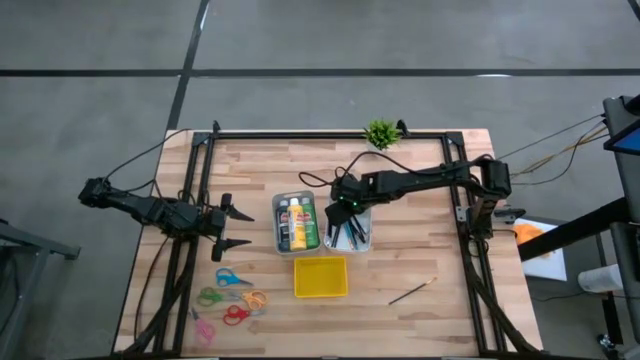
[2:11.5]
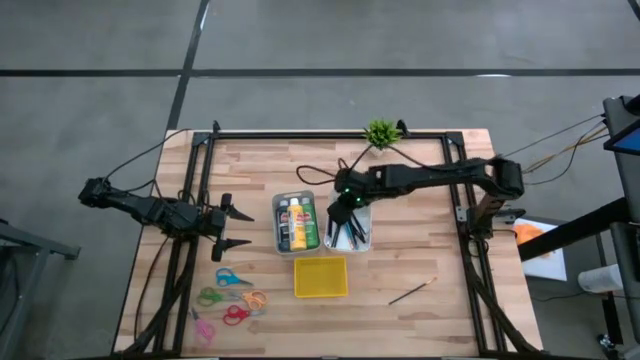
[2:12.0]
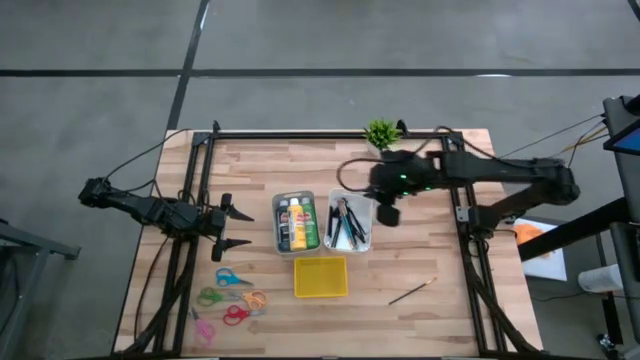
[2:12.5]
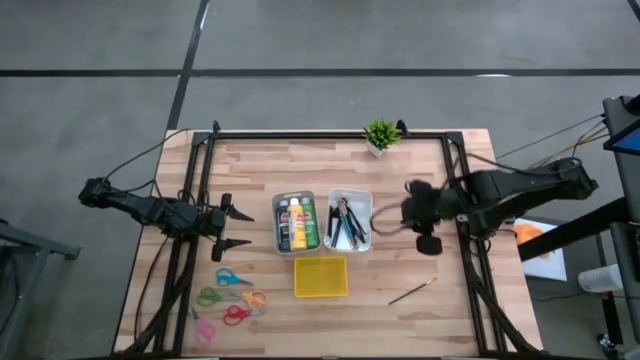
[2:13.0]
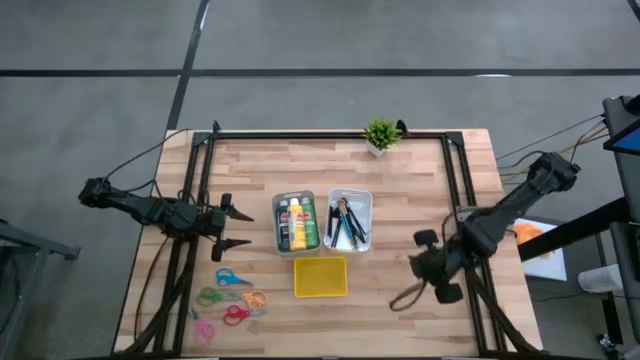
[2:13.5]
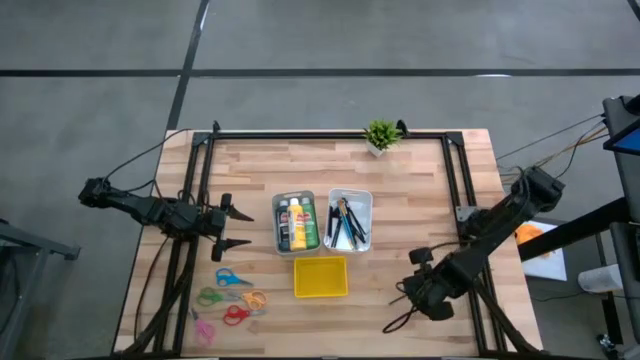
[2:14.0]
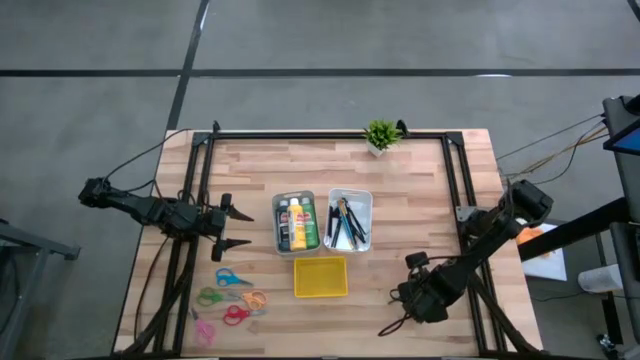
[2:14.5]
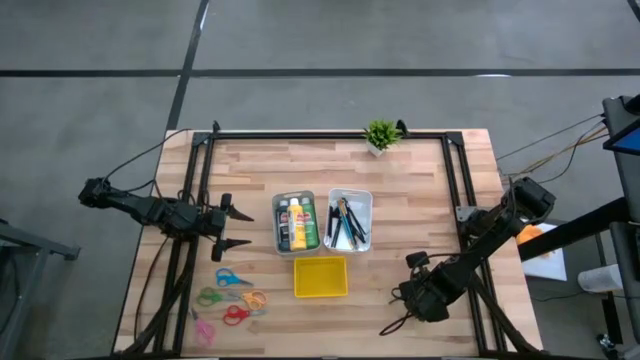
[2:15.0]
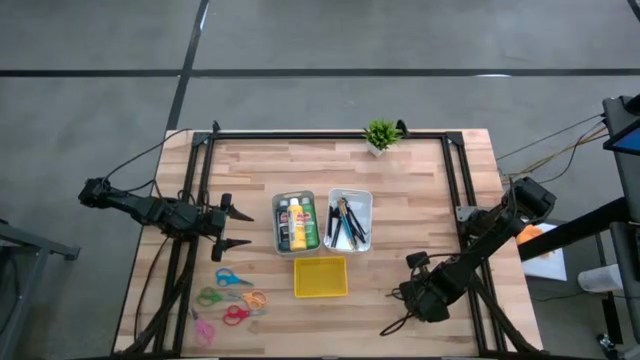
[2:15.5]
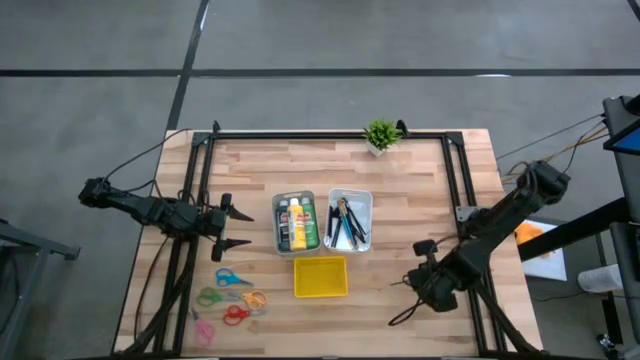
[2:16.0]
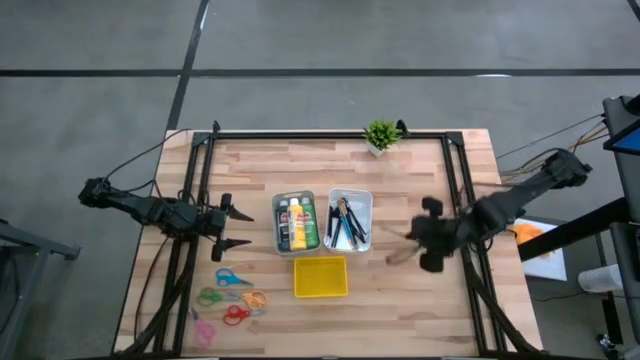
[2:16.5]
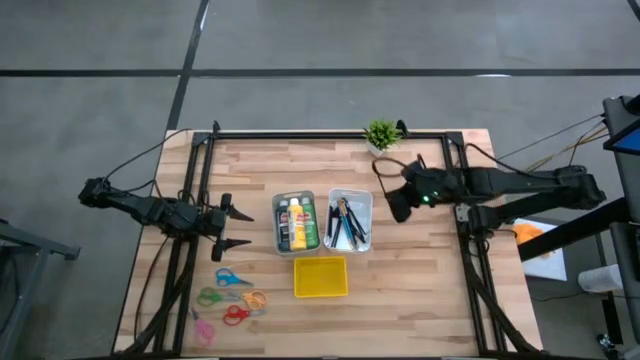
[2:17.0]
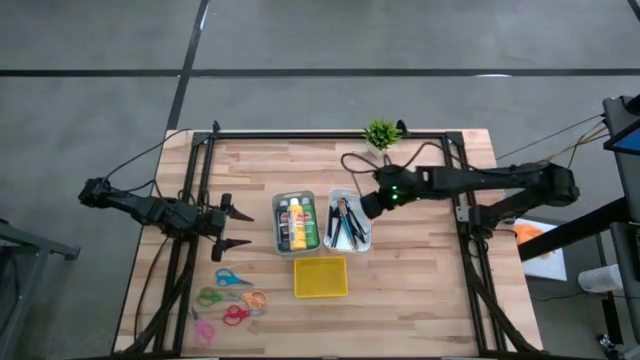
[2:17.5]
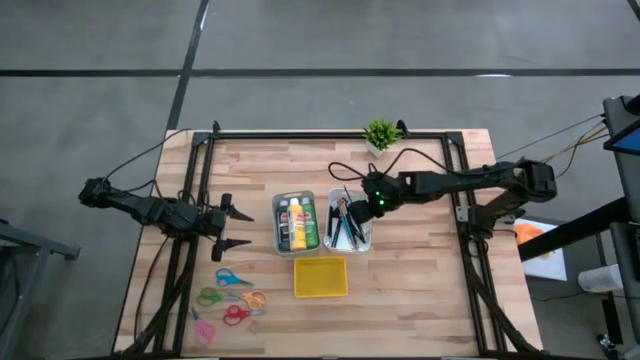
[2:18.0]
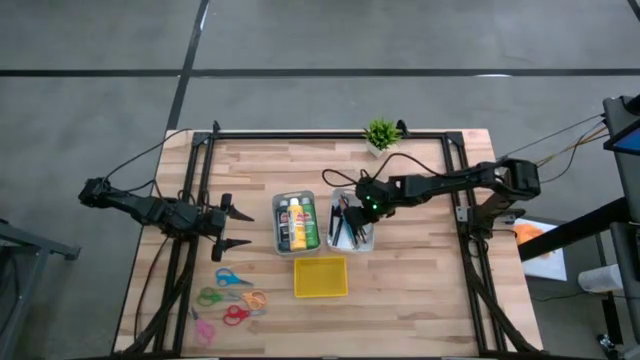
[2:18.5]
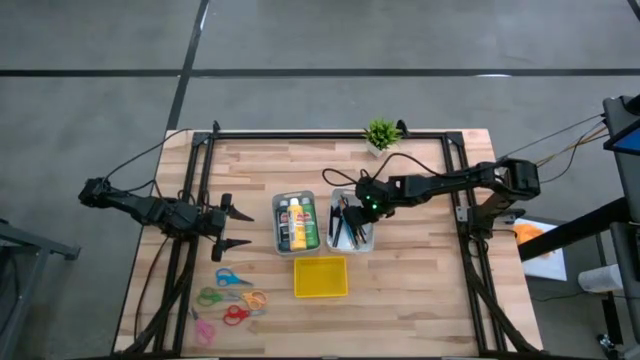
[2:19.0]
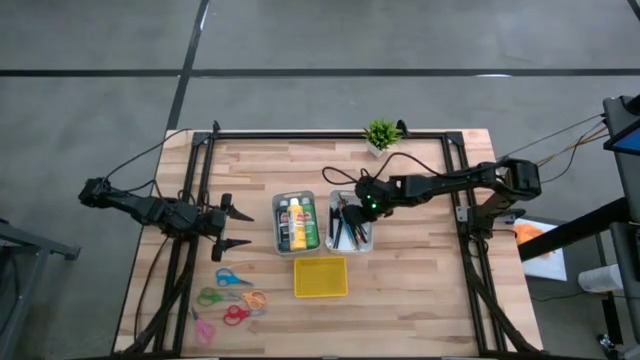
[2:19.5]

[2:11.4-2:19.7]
Task: Pick & Place Paint Supplies
Put the gold paint brush into the white bin

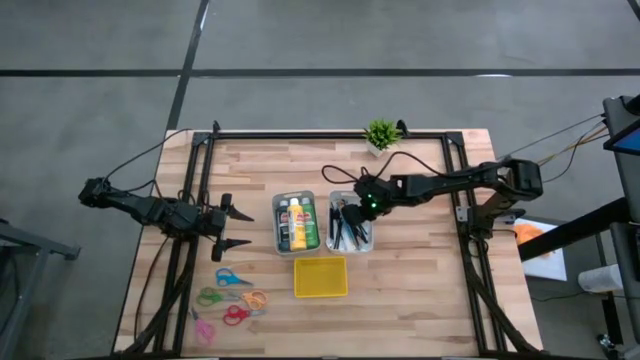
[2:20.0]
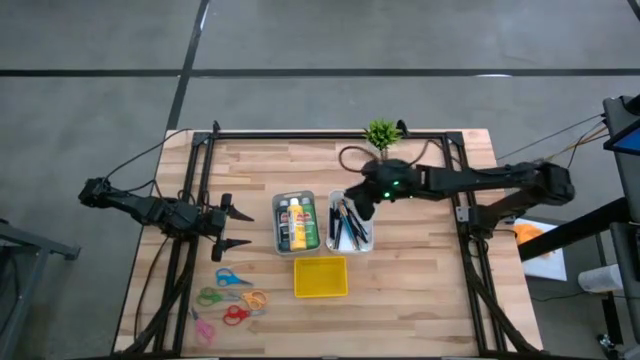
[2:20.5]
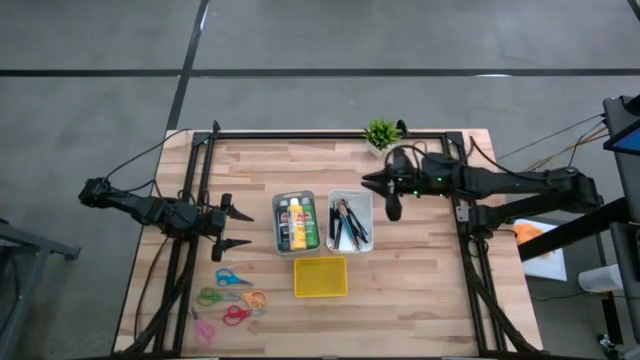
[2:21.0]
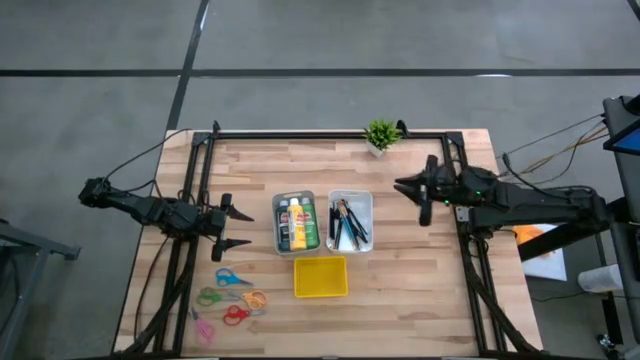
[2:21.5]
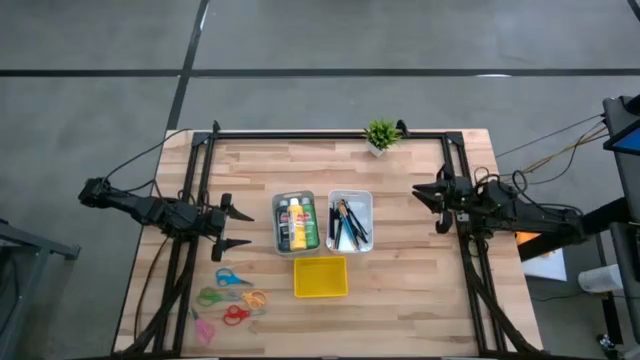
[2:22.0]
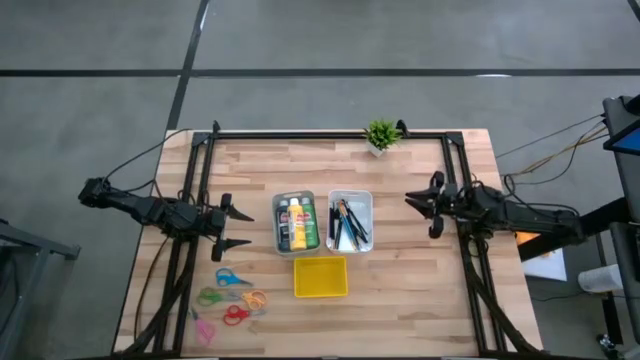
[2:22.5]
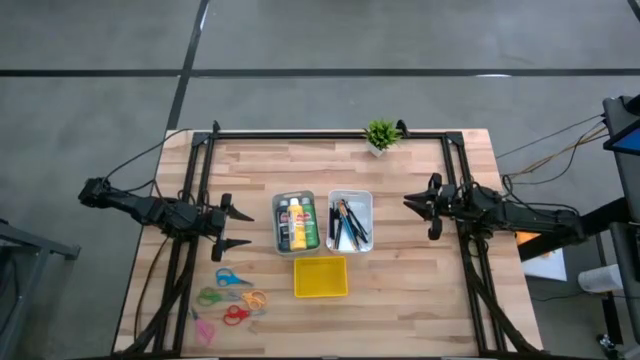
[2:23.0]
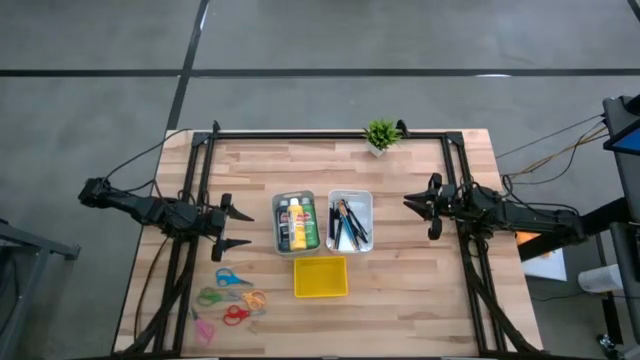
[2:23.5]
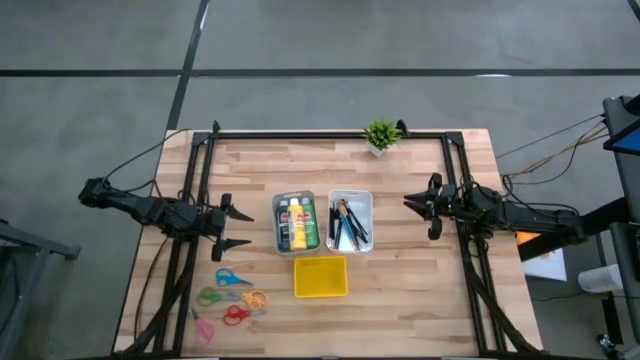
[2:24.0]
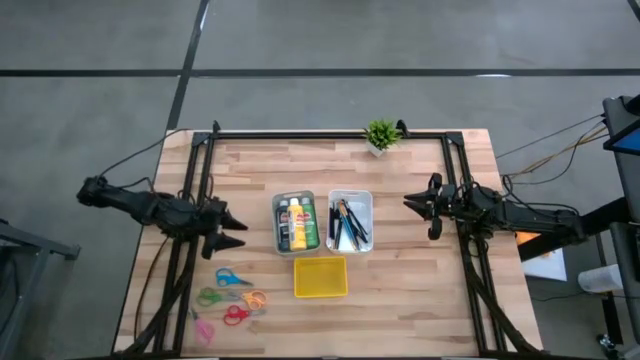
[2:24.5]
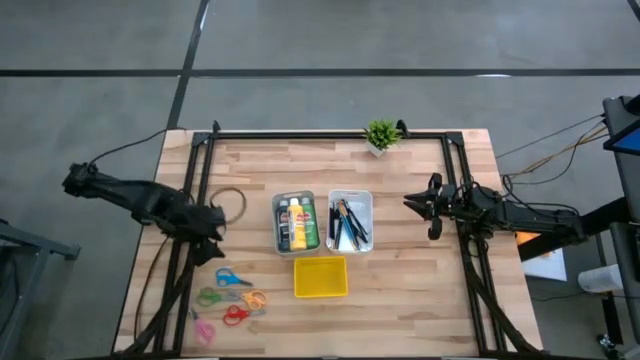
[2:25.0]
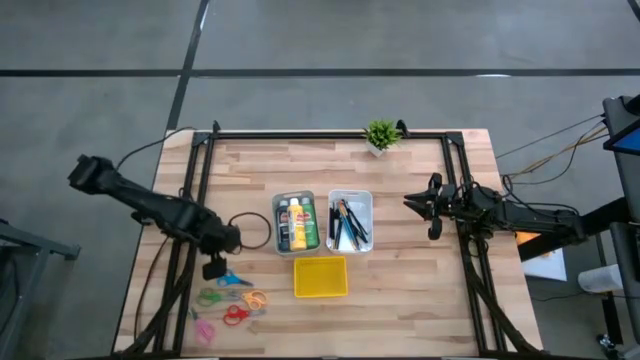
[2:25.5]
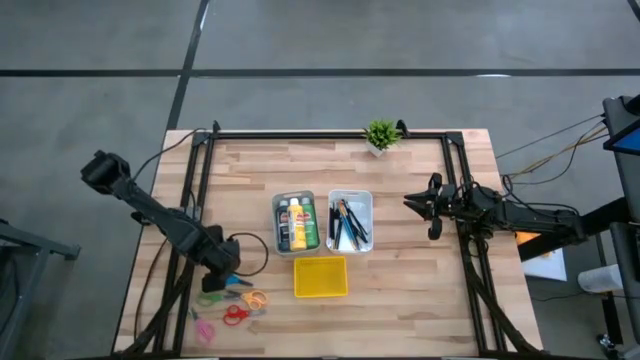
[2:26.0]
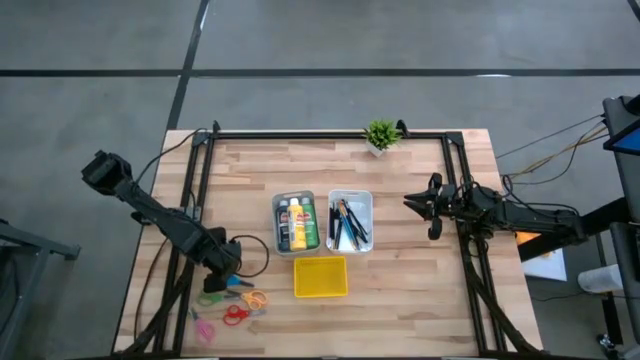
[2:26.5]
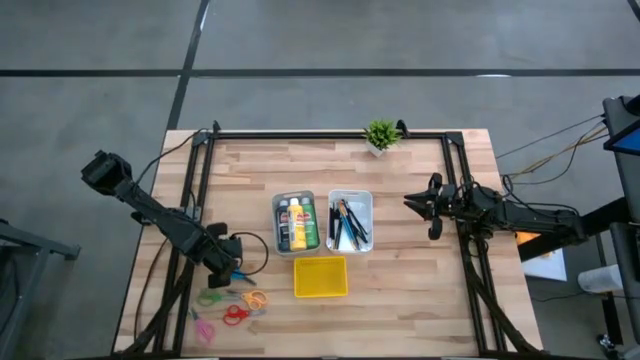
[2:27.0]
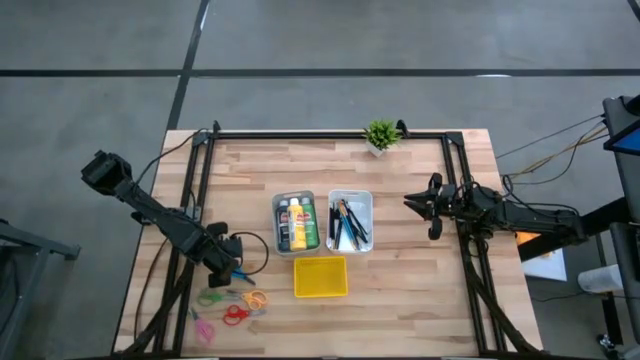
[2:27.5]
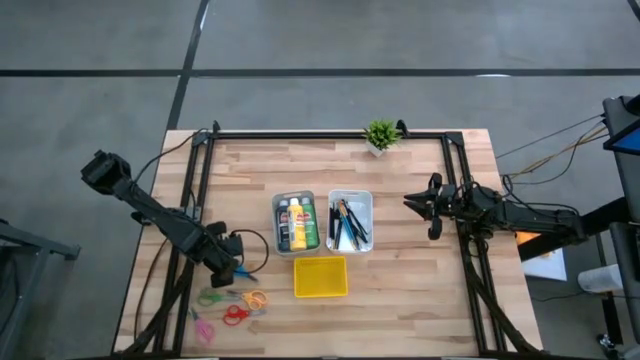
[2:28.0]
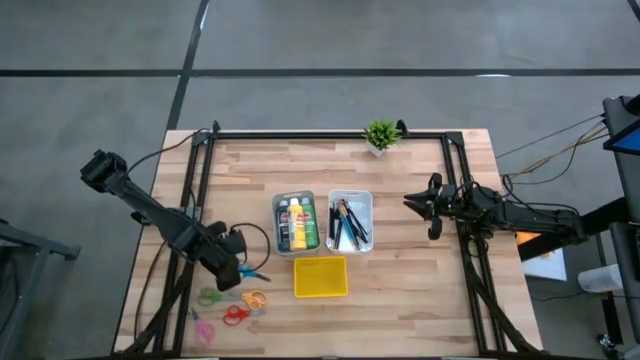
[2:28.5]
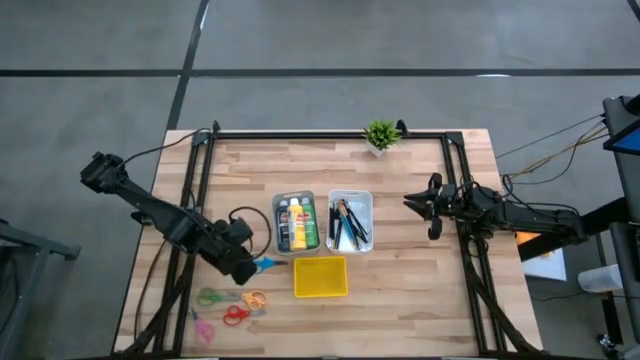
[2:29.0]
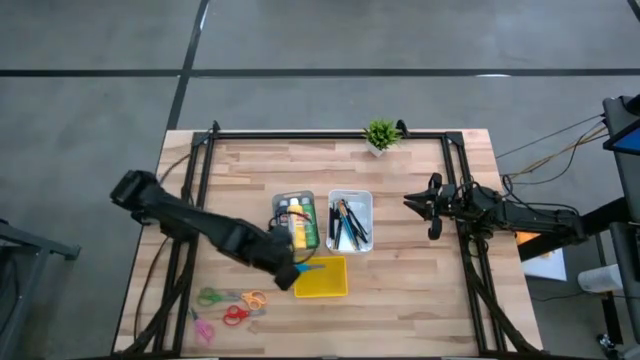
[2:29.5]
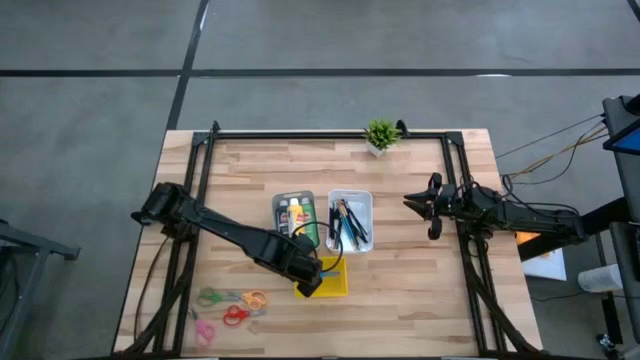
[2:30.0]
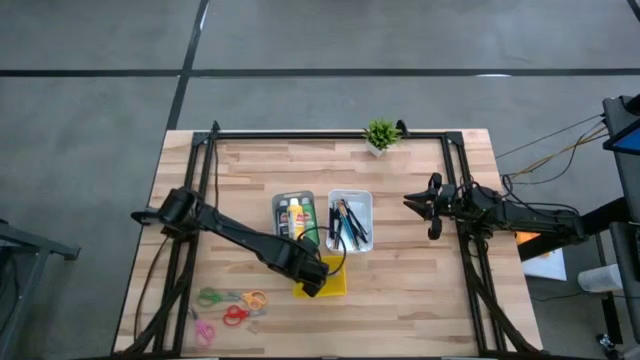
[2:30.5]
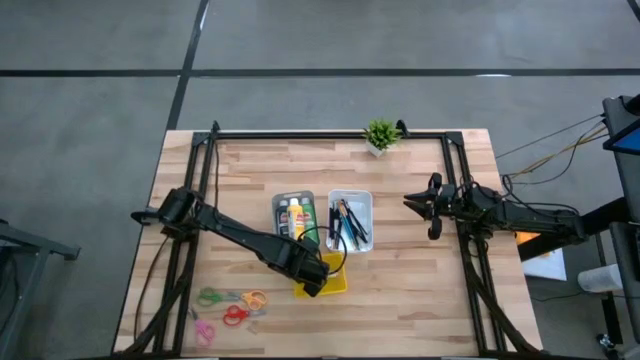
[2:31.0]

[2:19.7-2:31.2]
Put the blue scissors into the yellow bin

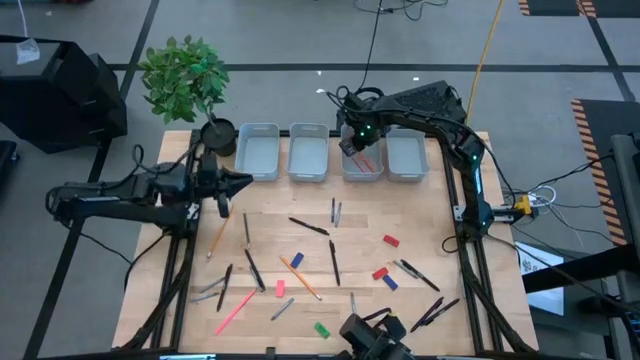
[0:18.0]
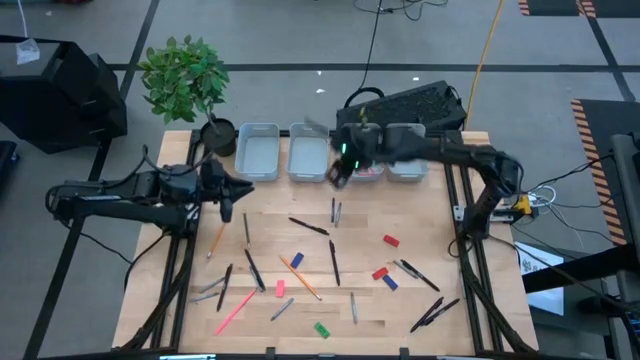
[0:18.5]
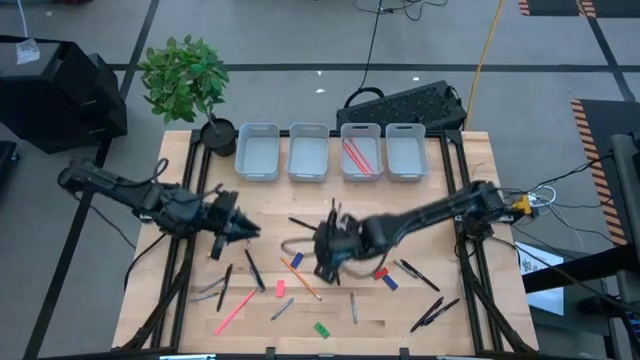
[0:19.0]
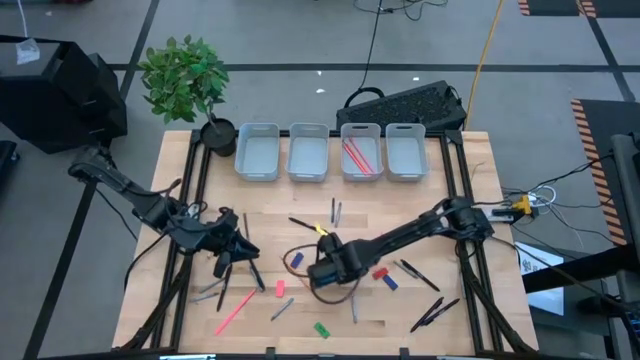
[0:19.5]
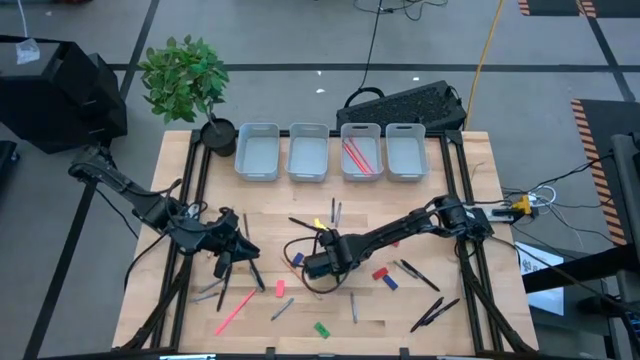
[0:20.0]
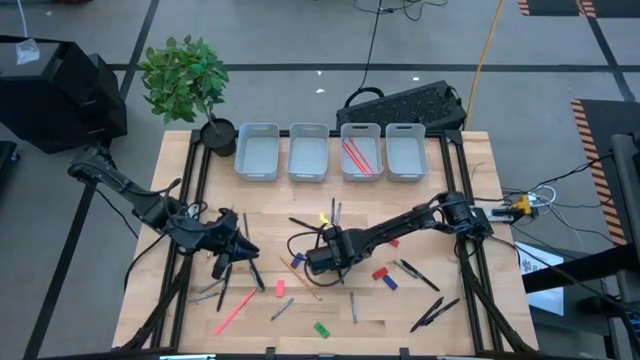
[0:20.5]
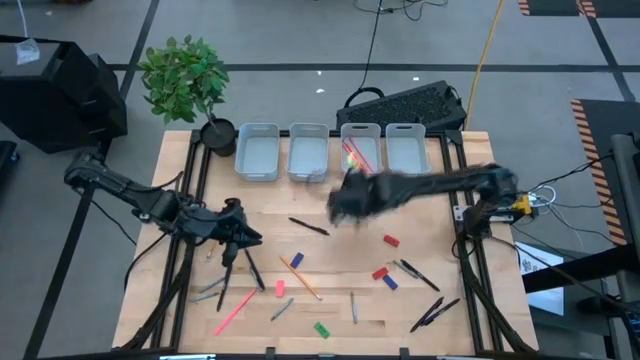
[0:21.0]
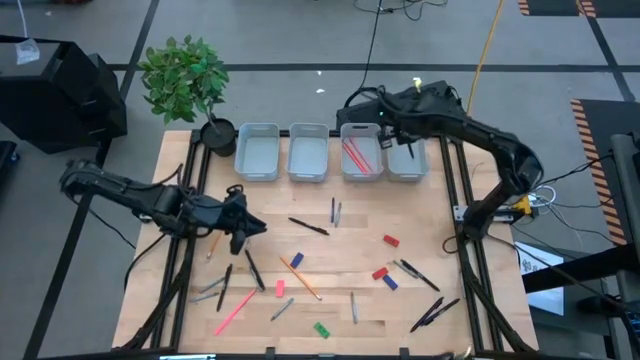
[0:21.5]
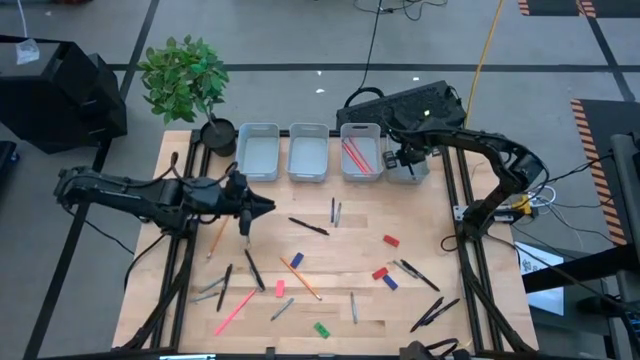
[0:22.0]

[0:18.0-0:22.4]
Task: Sort crayons/erasers/pens/pencils in bins
Put the black pen into the top right gray bin
